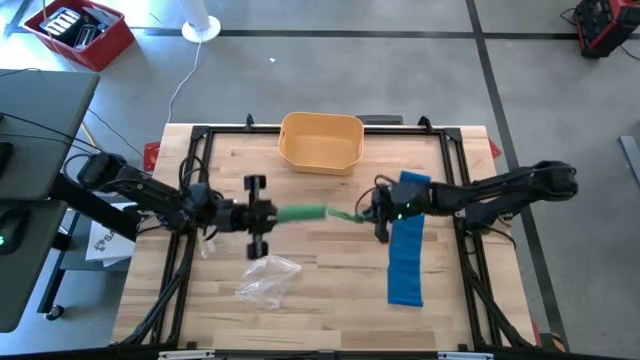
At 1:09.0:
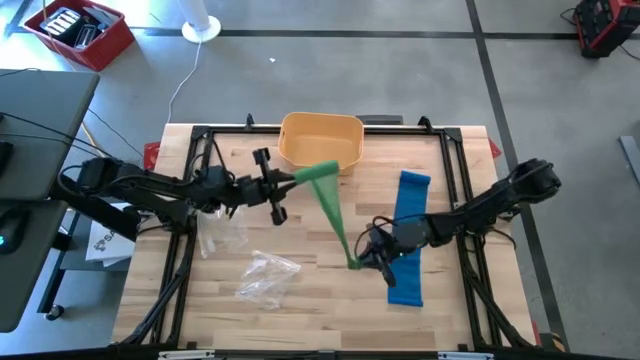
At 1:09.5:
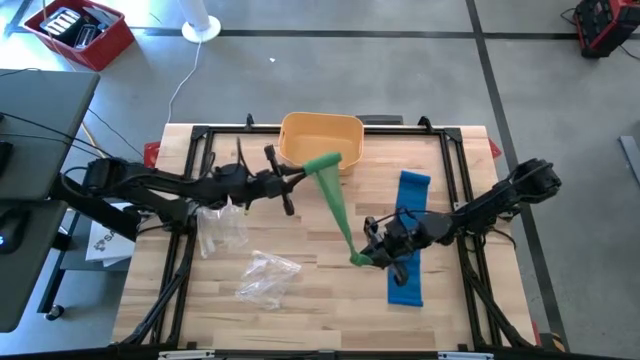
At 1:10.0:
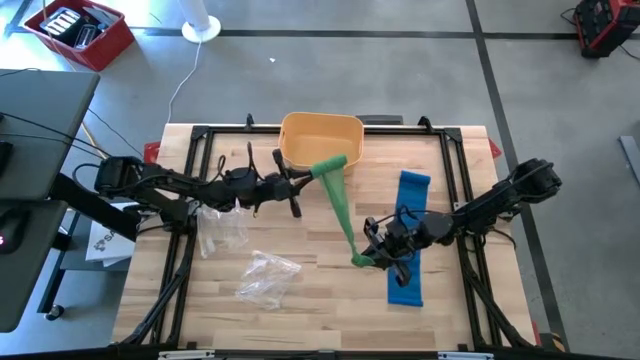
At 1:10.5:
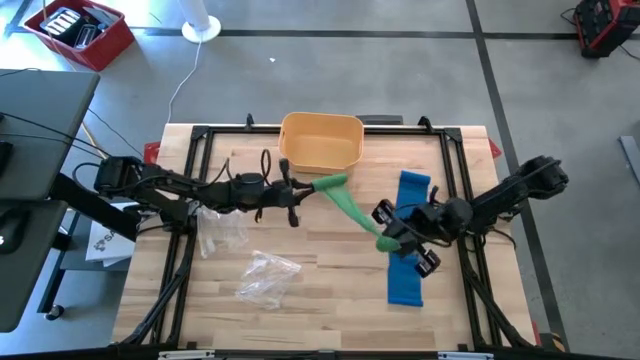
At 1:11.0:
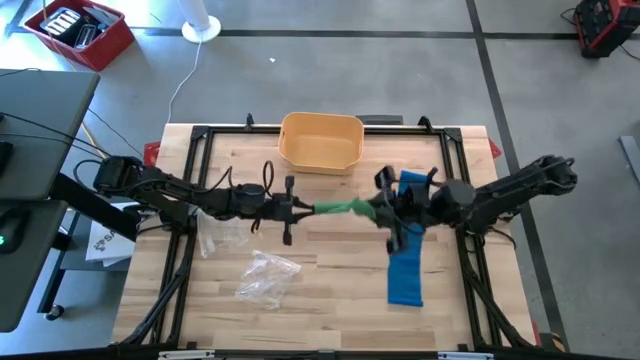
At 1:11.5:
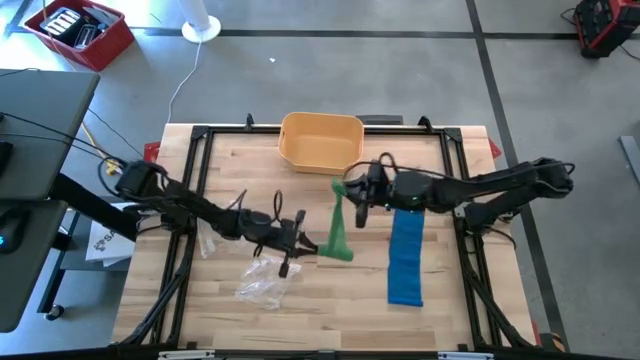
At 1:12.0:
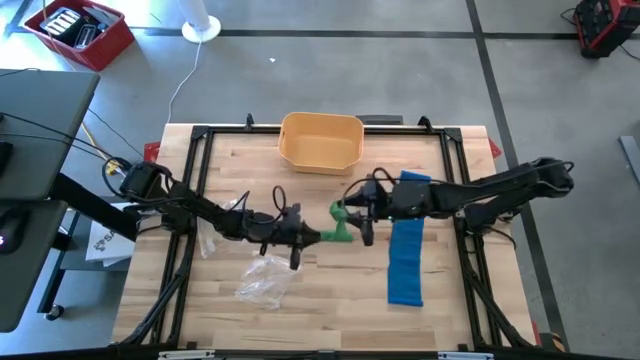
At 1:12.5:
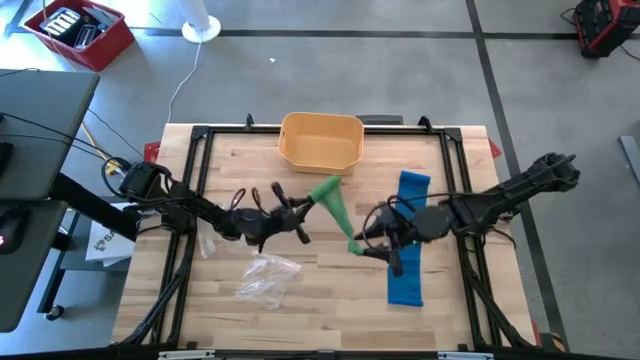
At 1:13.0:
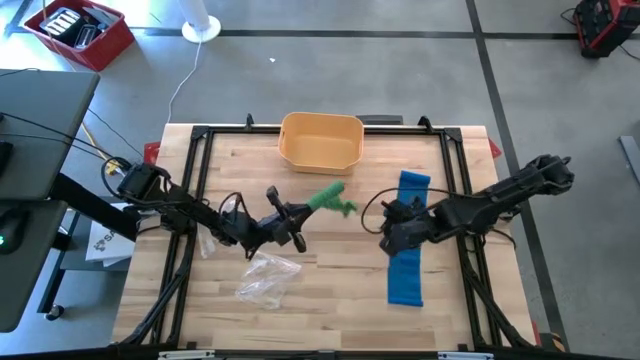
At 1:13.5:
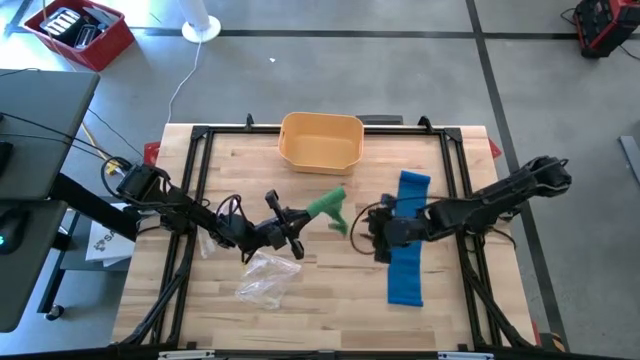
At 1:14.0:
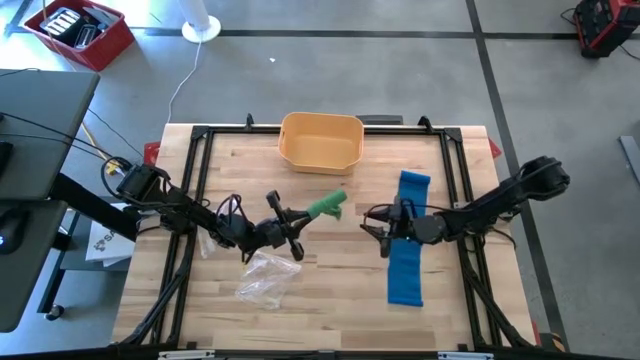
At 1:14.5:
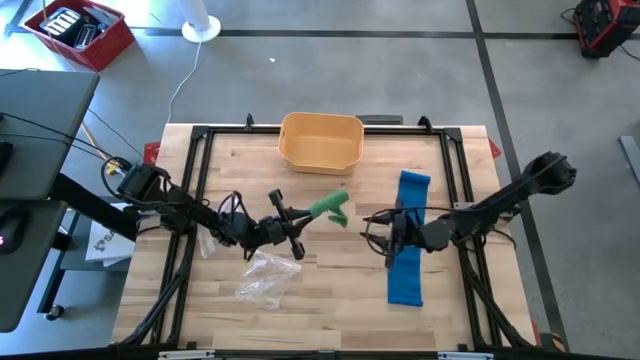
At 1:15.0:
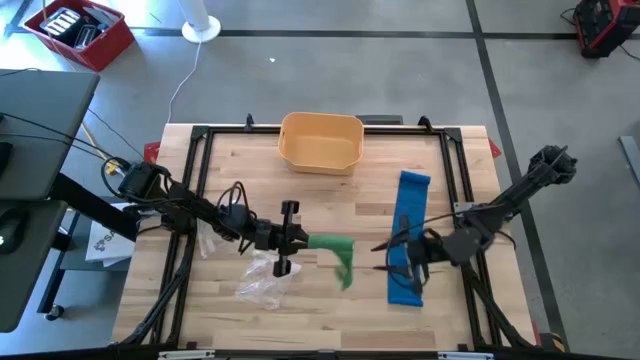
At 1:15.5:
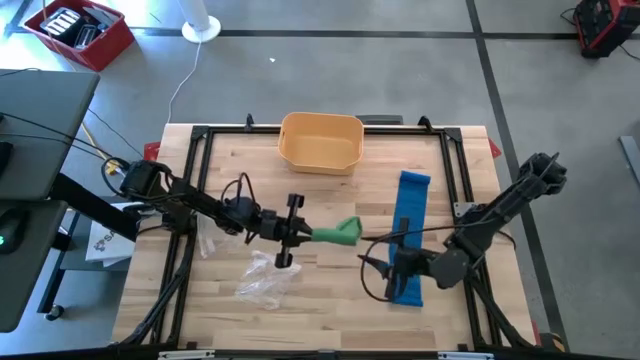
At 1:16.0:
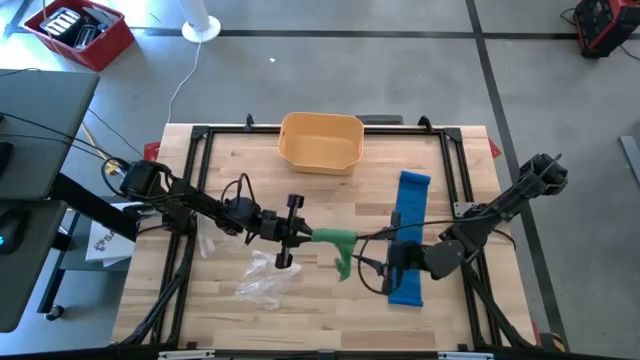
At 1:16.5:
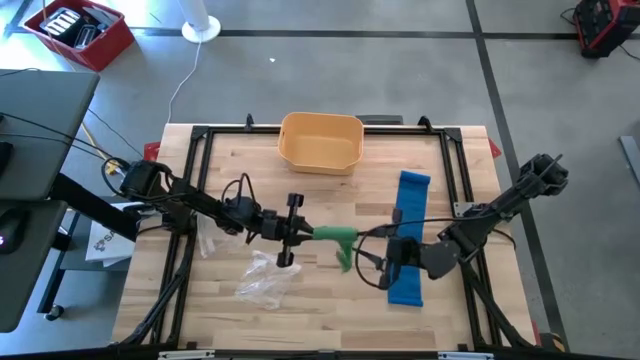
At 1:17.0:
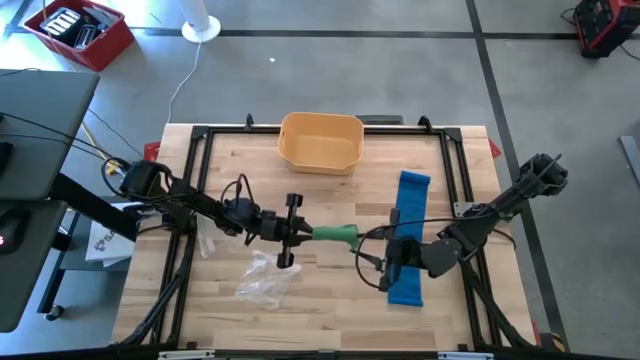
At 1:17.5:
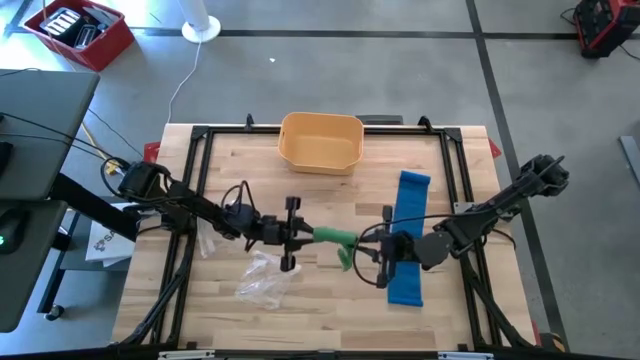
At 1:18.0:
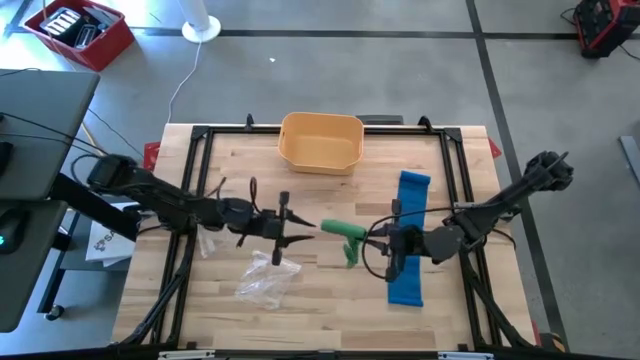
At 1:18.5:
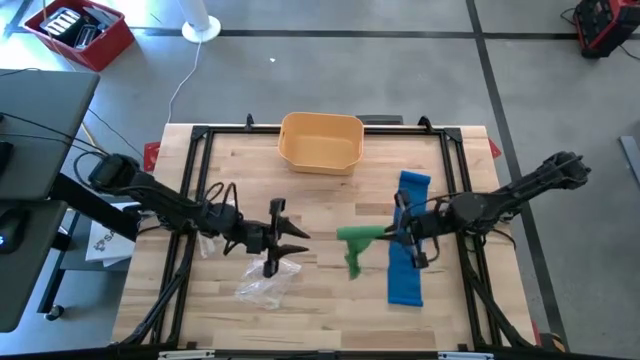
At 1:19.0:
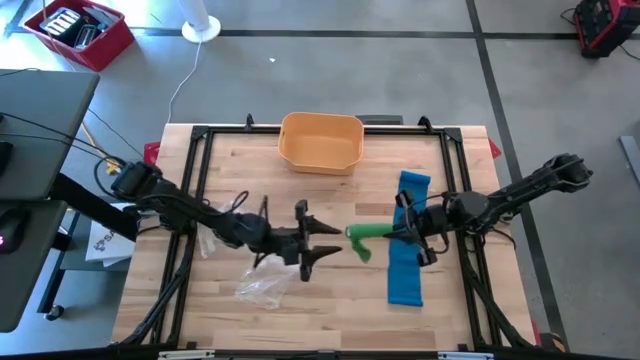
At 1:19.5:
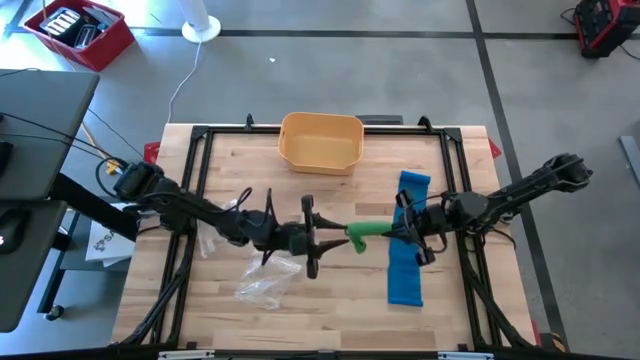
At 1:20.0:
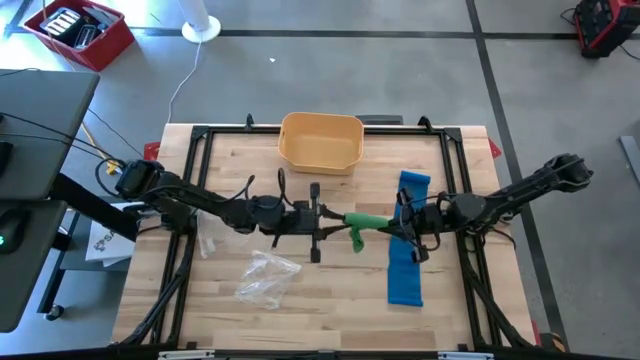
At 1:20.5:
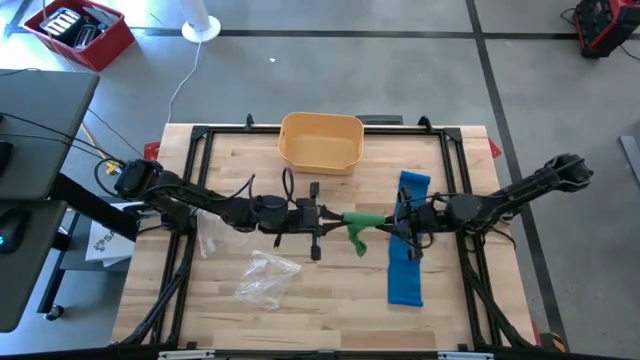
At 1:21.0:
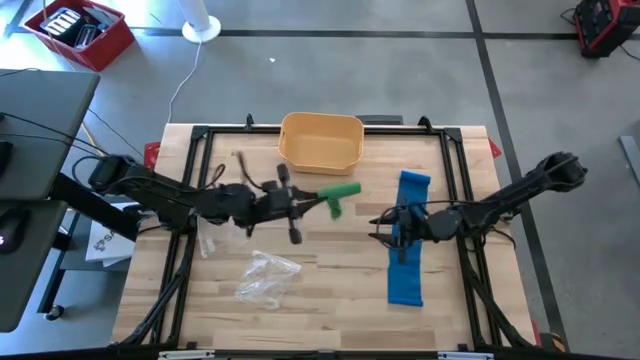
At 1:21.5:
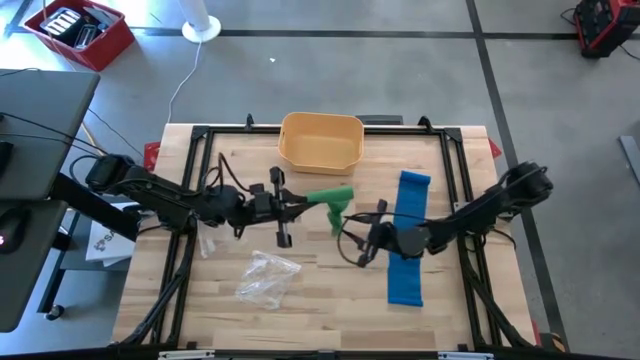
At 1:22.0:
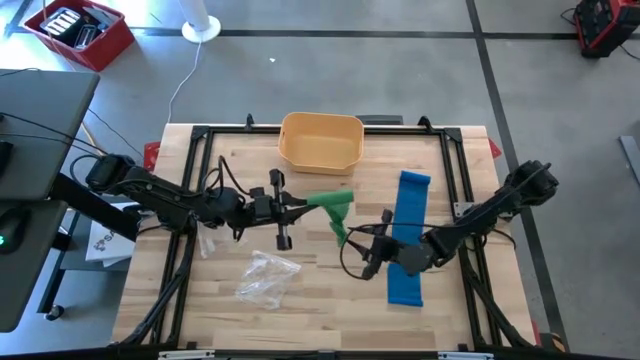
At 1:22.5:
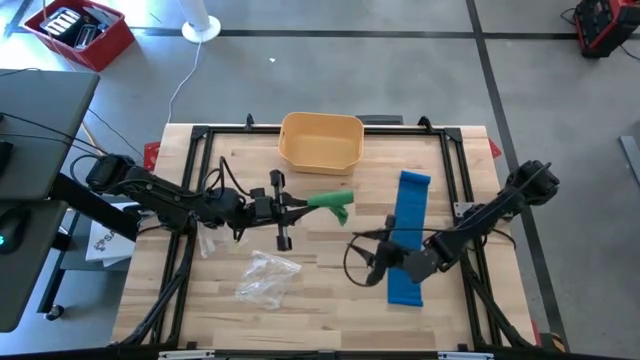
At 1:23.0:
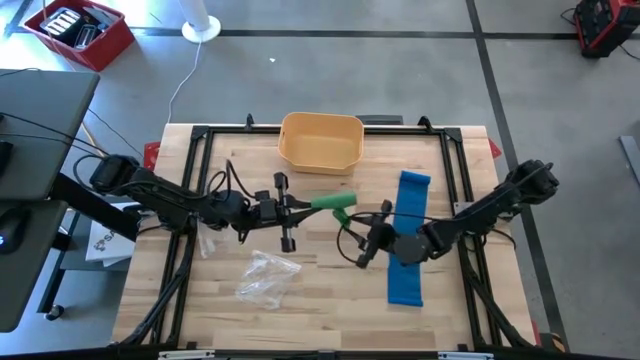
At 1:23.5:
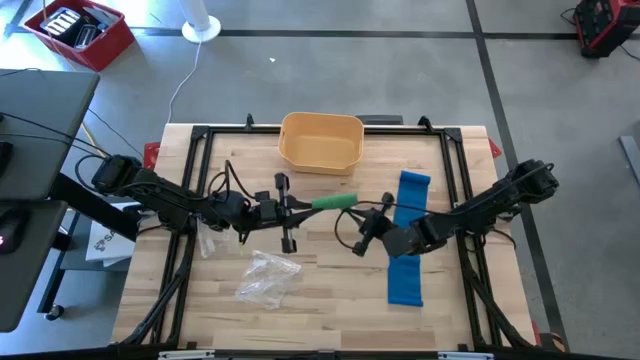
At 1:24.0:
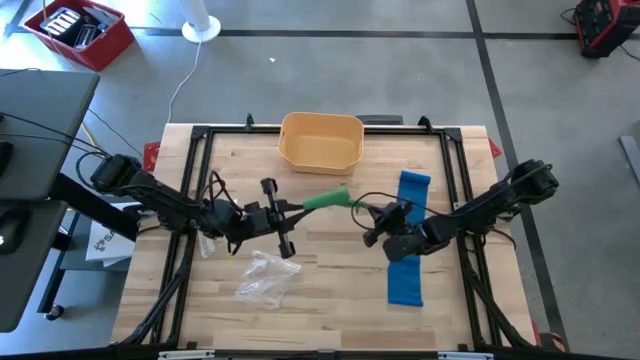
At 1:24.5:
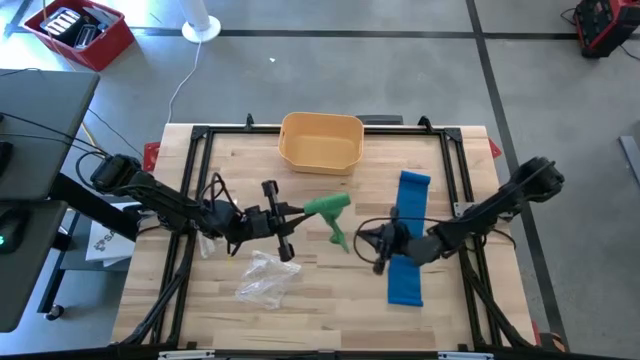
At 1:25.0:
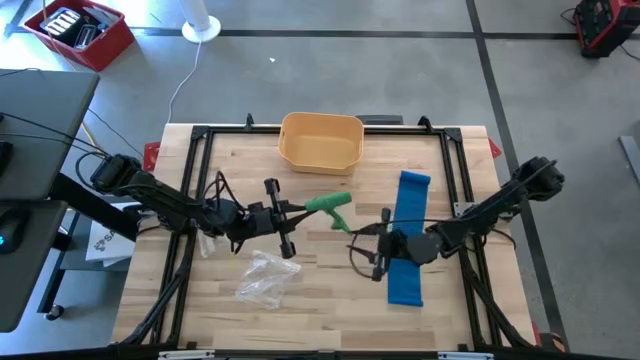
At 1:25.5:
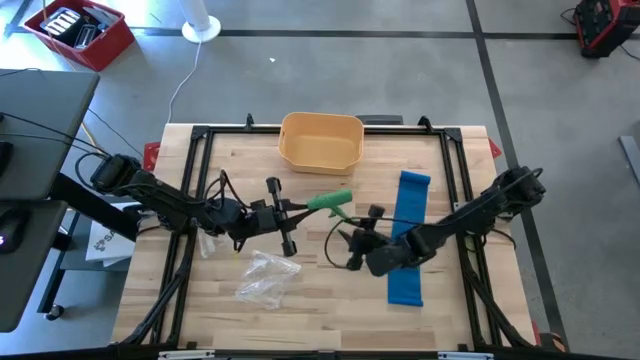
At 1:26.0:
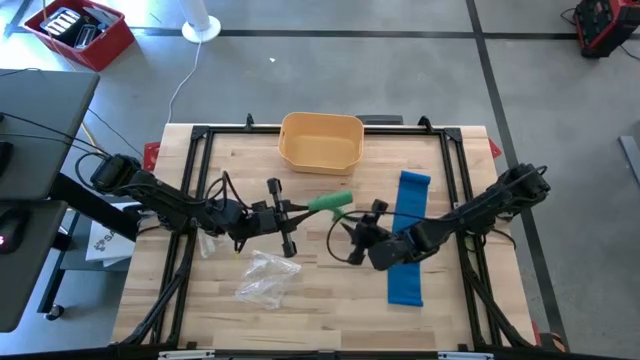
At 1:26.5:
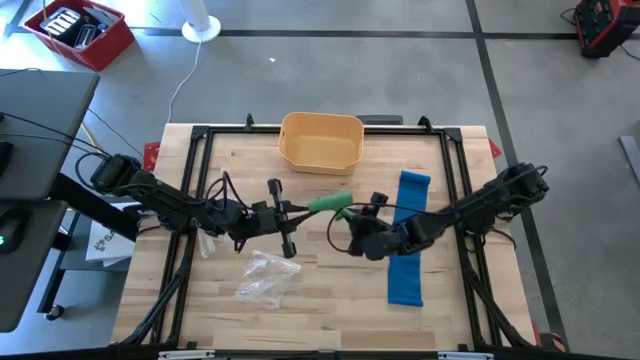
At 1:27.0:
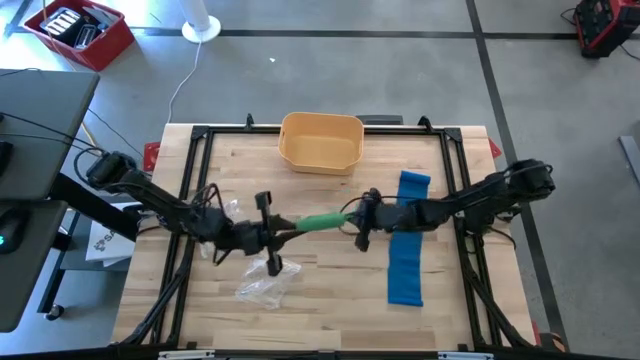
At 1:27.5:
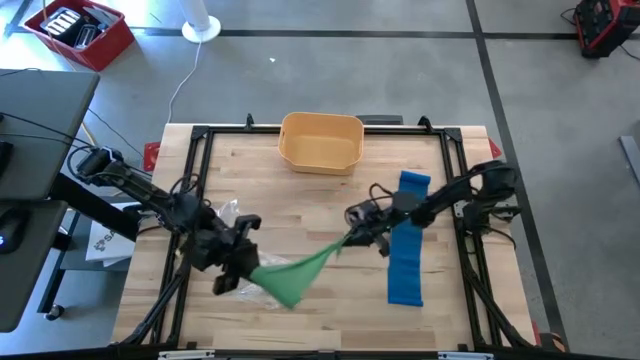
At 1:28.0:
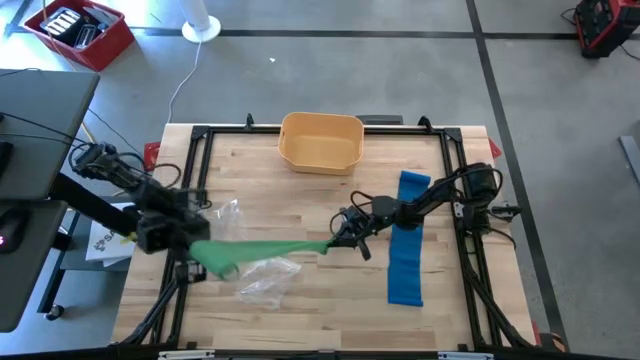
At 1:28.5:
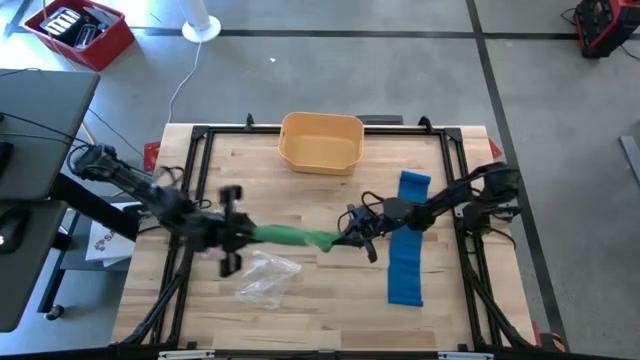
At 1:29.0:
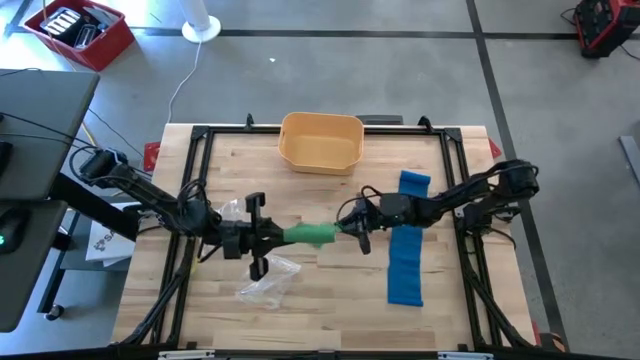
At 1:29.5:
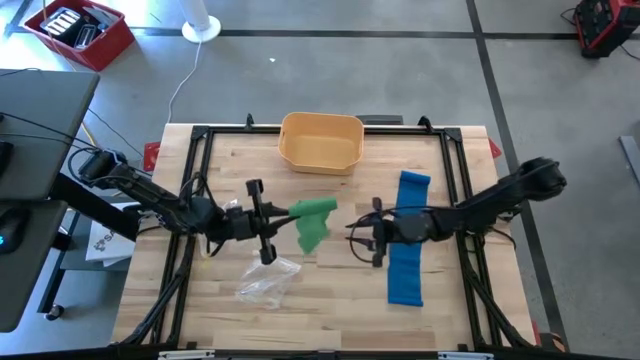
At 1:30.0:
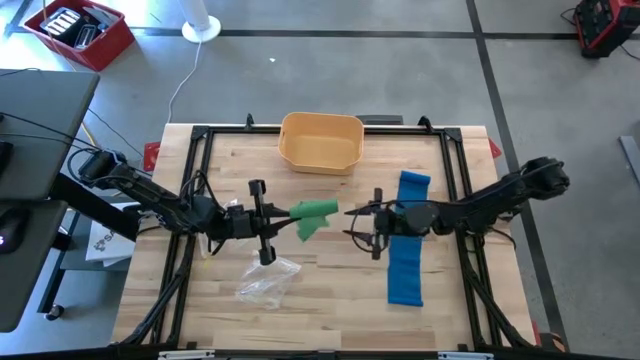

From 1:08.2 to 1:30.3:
Task: Roll bandage
Roll the green bandage
